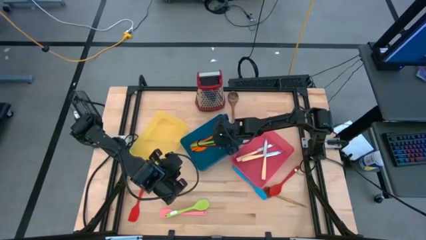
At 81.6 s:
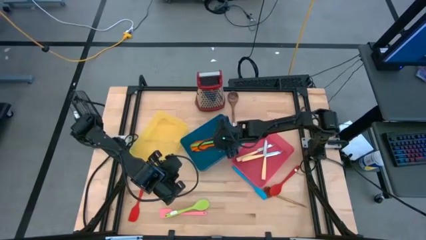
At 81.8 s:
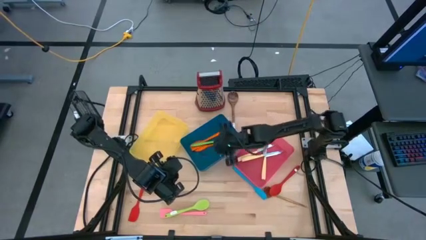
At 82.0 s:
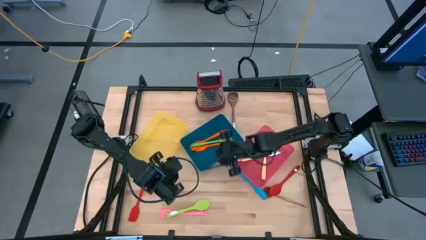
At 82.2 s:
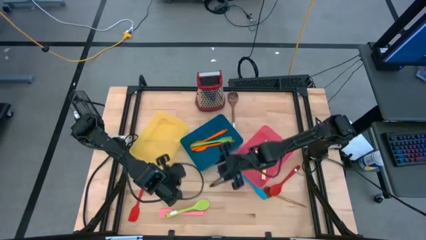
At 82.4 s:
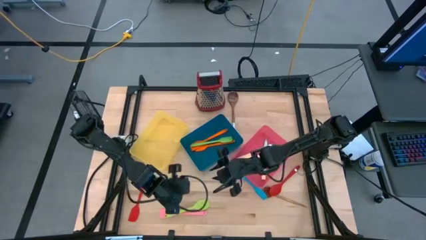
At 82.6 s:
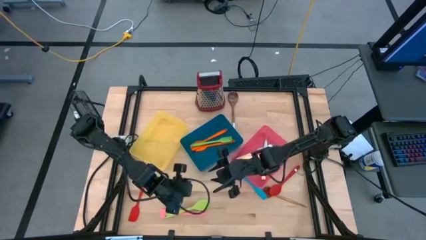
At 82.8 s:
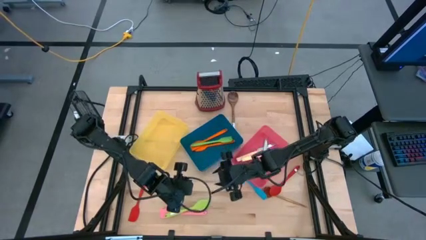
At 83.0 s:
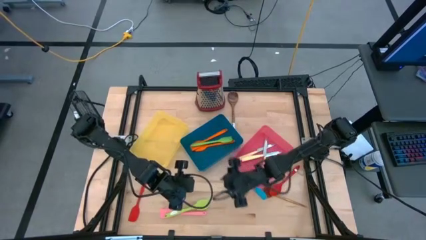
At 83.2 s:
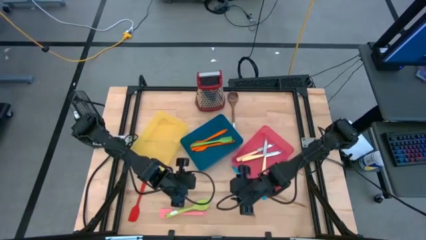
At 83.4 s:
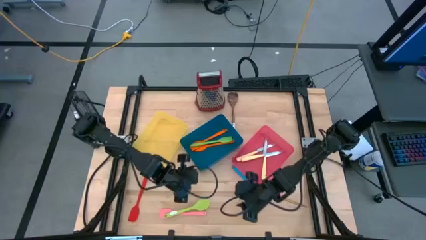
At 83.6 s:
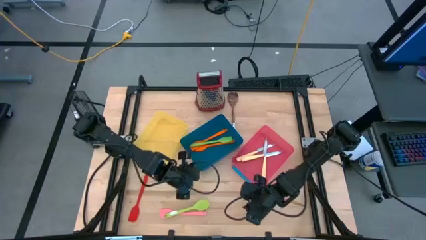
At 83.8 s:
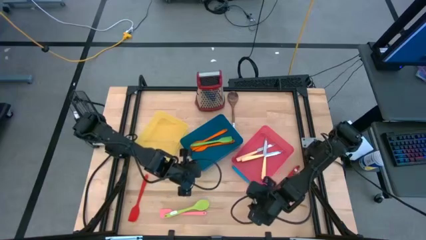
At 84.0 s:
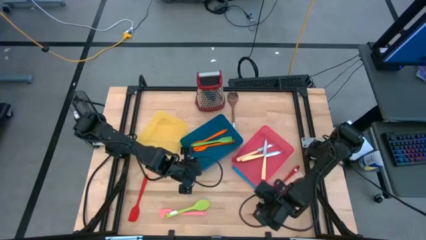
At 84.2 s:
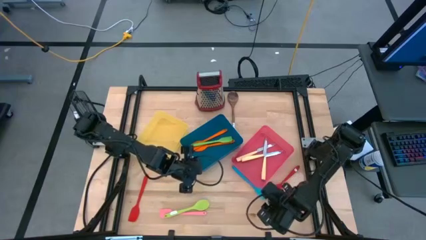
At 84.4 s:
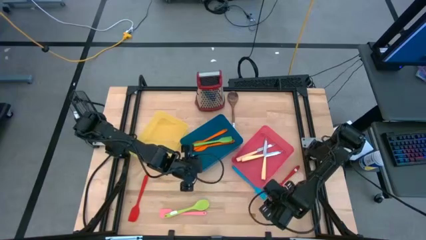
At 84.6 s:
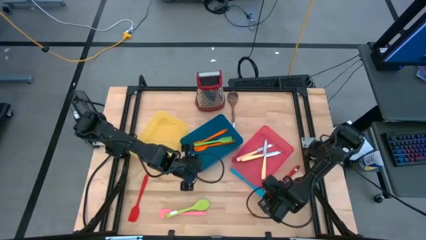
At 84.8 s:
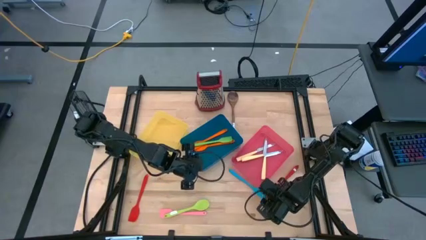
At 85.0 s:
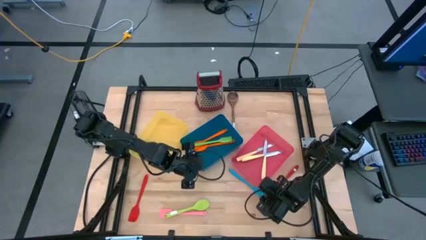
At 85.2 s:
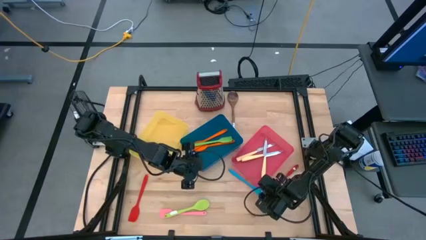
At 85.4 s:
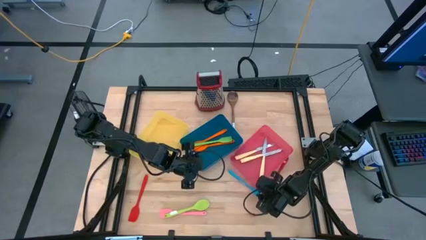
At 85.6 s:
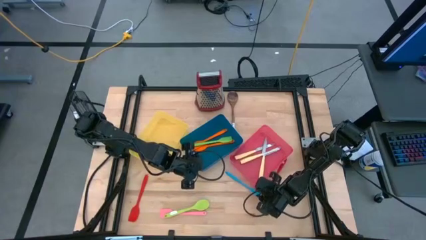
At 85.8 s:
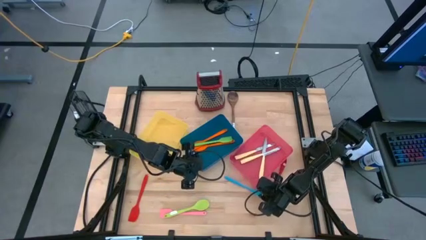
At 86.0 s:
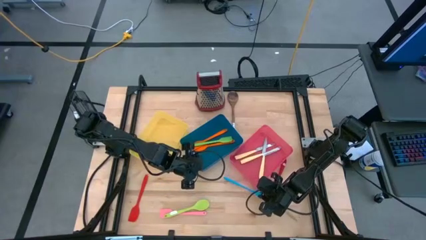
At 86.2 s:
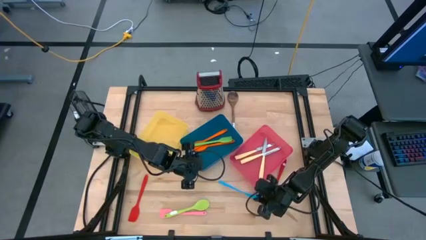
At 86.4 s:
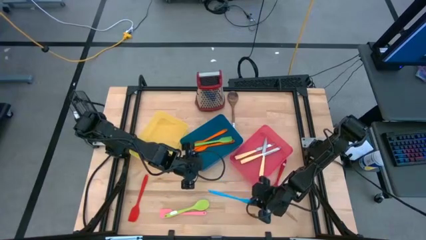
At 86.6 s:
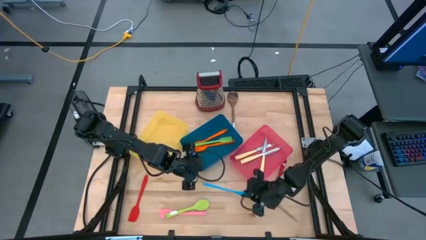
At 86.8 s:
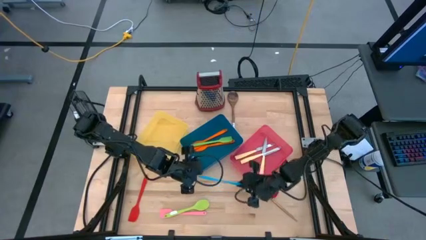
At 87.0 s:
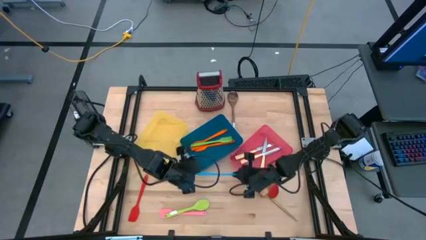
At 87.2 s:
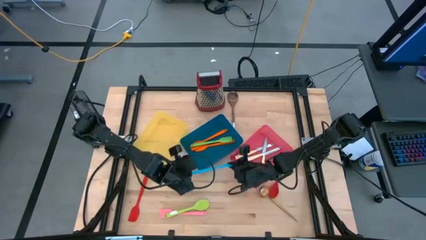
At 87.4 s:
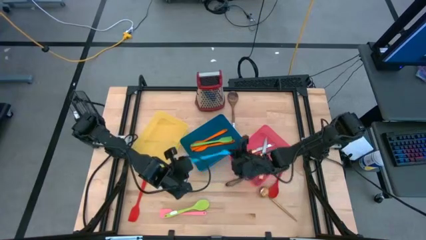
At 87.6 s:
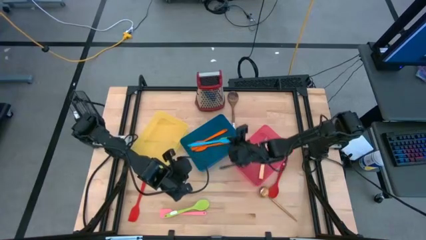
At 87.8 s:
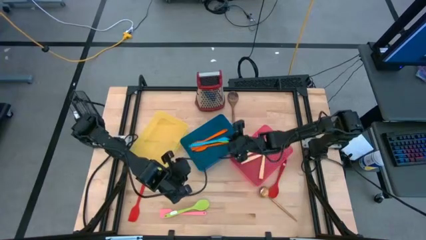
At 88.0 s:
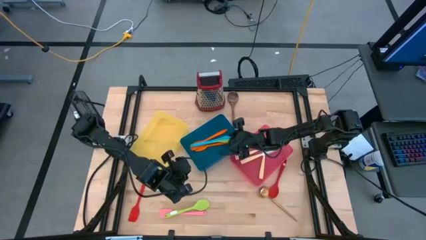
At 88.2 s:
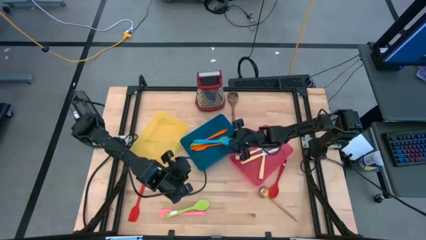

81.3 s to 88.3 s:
Task: Pick & Place Kitchen Items
Put the blue spatula into the blue bin

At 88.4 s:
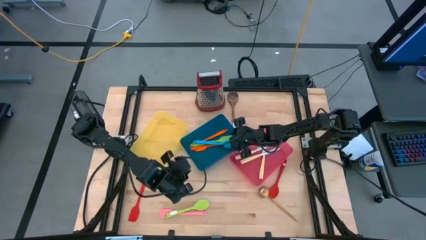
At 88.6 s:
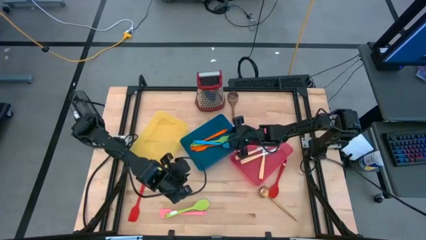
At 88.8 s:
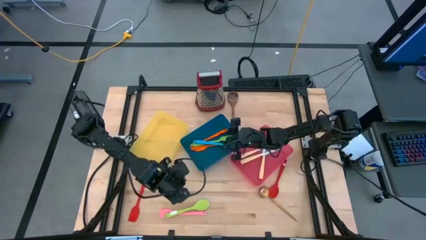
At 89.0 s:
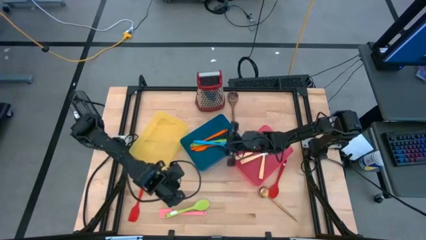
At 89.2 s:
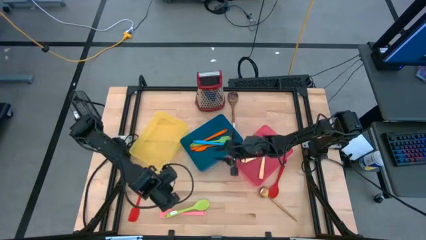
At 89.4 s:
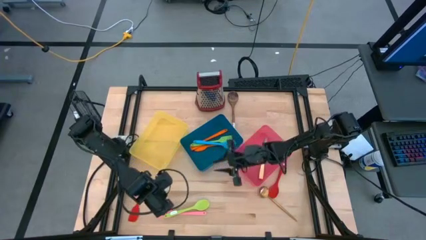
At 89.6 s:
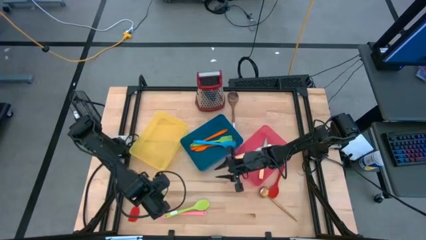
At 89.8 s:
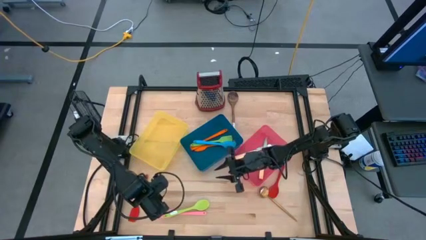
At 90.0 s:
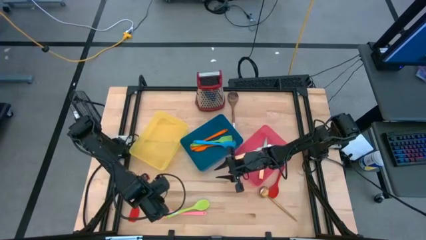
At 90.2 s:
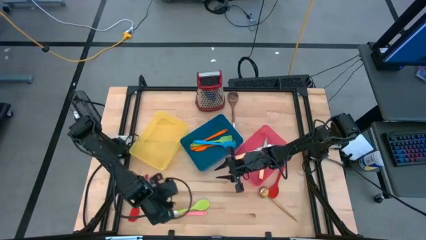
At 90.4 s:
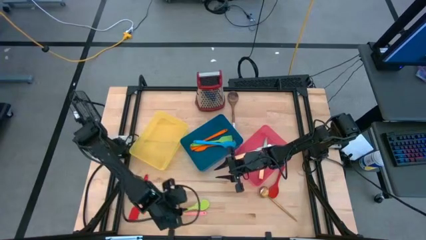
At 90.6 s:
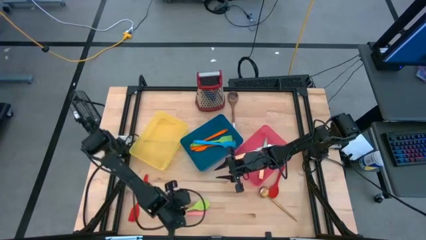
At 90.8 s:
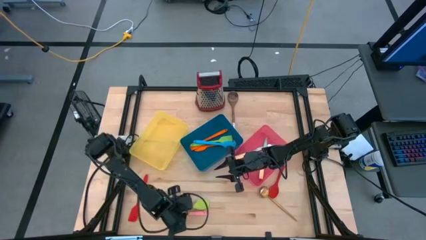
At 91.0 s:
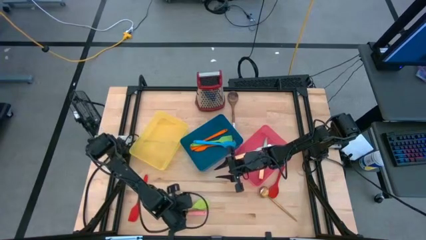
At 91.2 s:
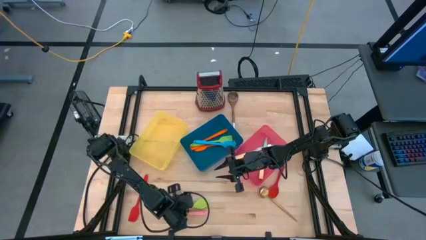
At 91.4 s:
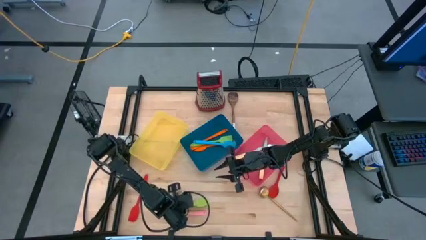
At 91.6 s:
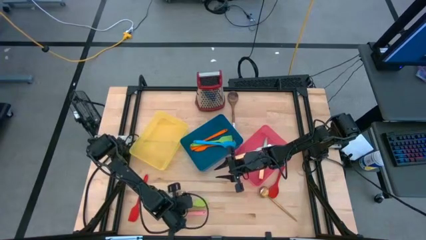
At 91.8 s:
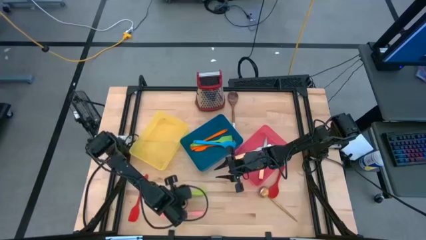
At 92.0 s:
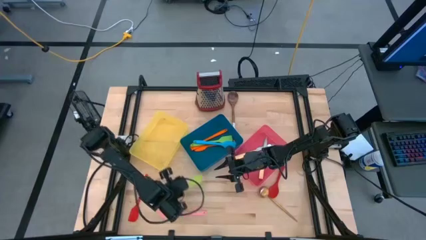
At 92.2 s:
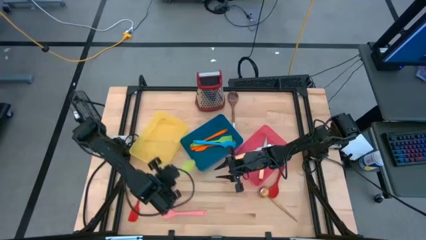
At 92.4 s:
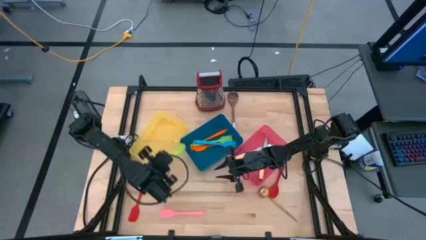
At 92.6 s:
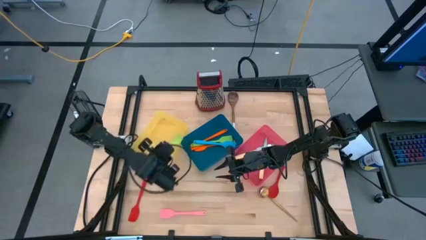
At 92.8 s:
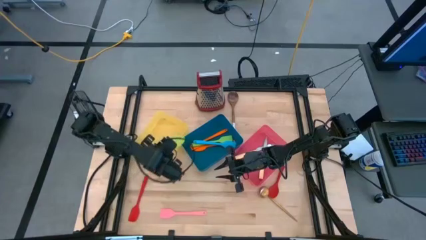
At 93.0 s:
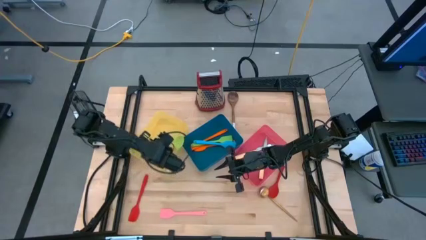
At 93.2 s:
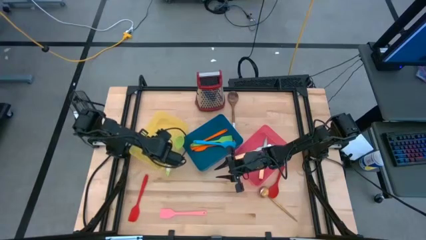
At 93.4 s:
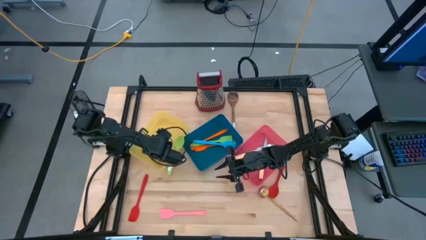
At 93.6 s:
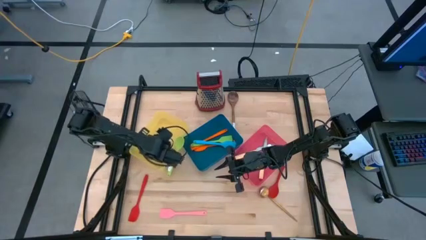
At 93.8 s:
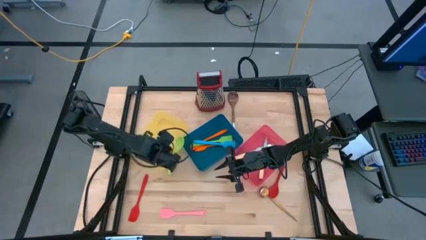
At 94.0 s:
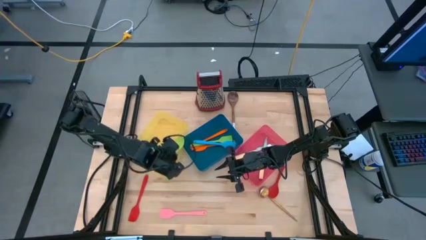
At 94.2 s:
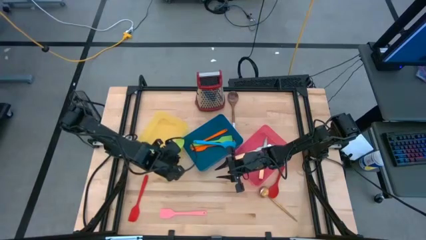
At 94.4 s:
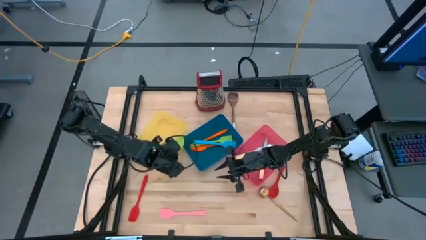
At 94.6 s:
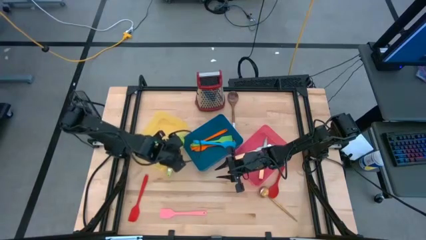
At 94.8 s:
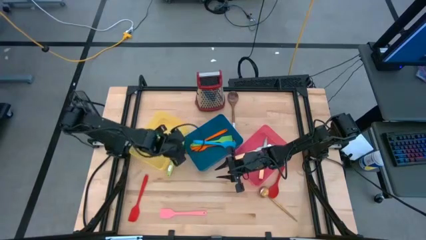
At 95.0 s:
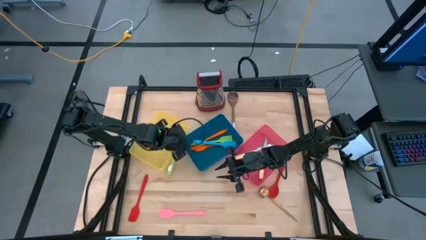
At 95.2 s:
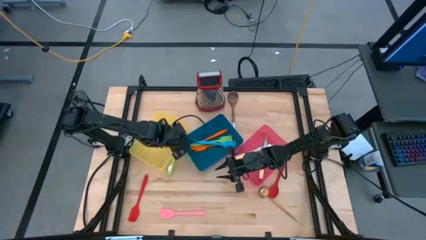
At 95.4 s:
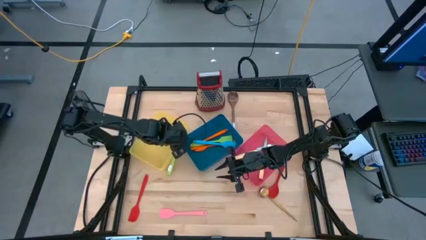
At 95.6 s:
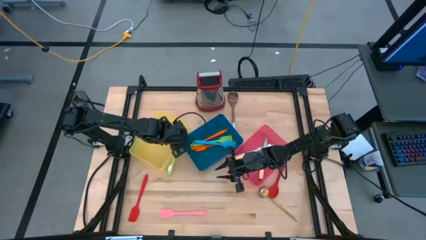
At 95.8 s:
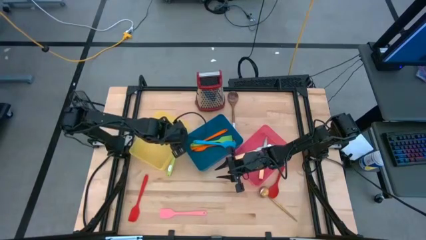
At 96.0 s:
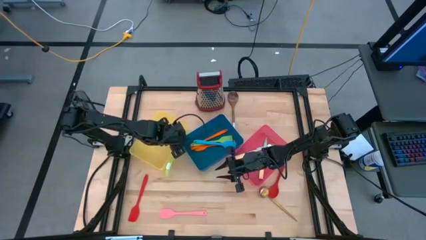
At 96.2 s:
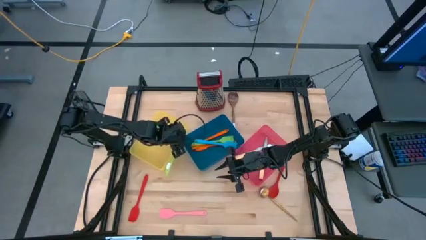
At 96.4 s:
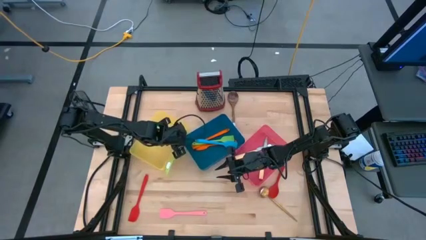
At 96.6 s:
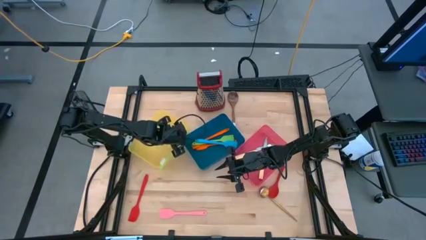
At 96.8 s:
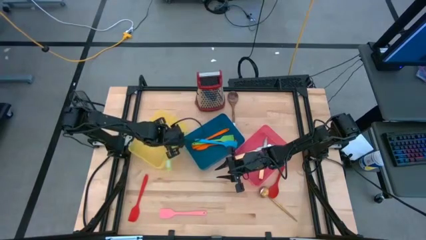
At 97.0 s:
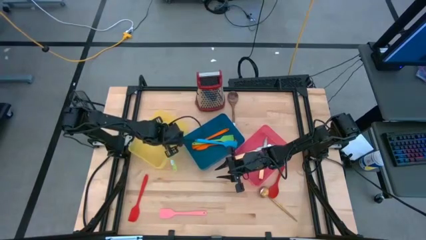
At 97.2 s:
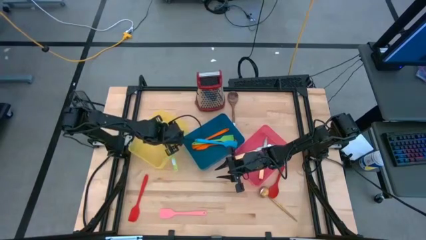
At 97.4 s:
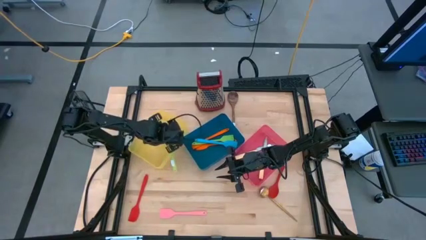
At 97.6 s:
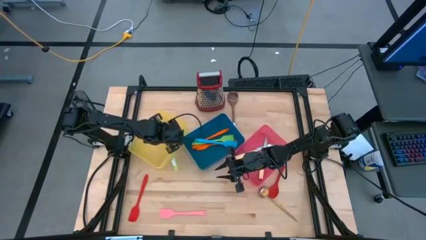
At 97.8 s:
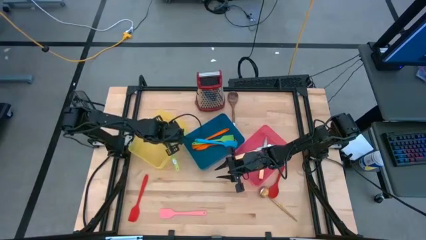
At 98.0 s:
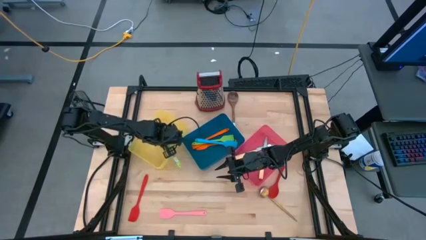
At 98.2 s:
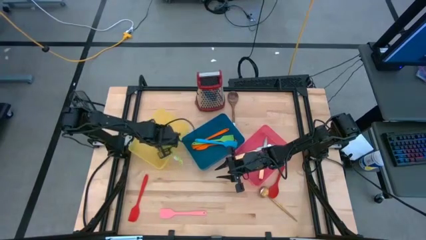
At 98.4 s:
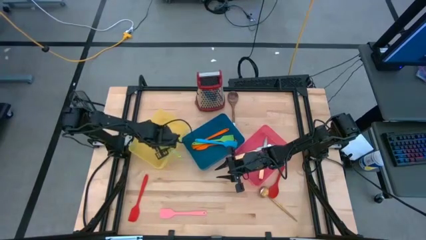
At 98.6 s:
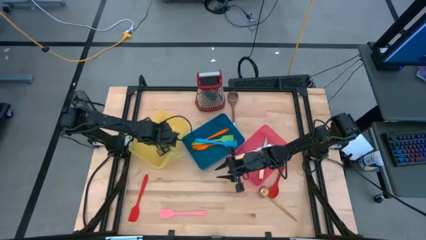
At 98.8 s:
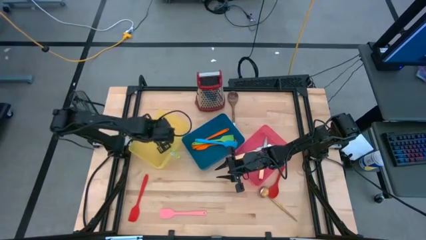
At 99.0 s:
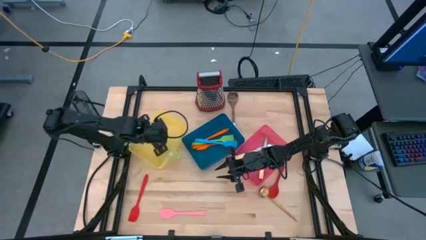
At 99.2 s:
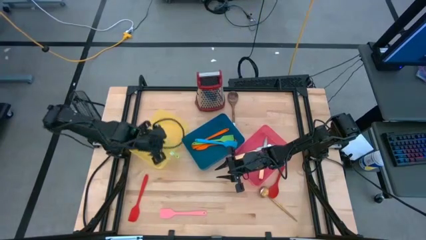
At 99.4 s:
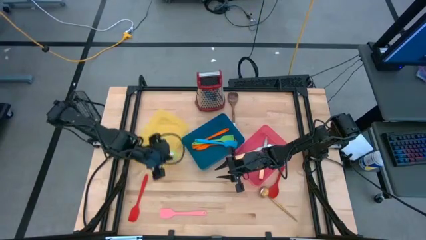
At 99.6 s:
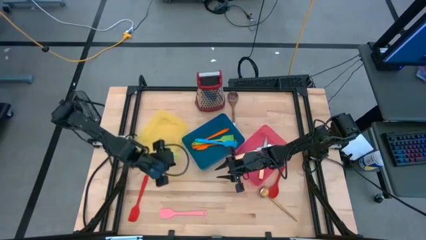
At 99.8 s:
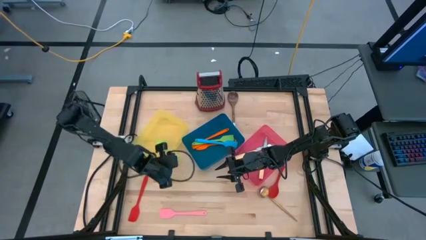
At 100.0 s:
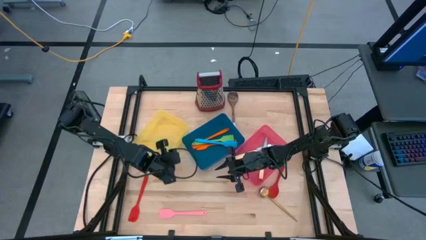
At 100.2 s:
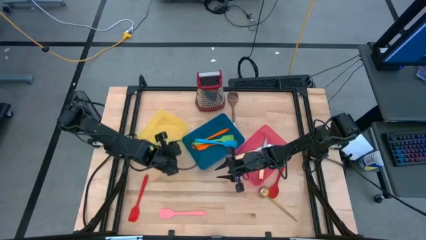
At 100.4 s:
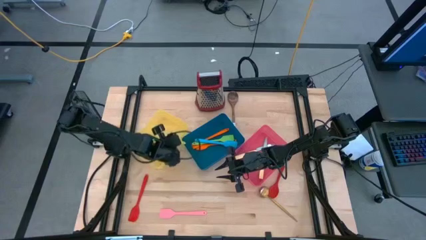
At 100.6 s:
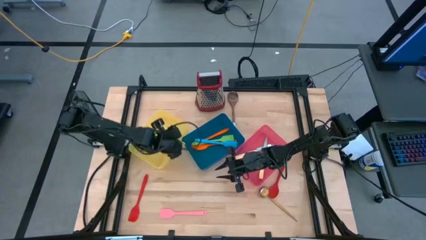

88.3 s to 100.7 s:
Put the green serving spoon into the yellow bin
